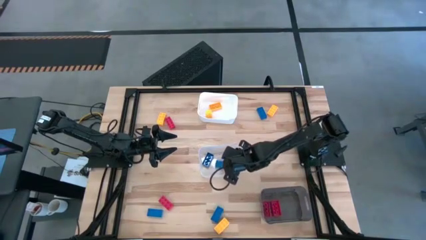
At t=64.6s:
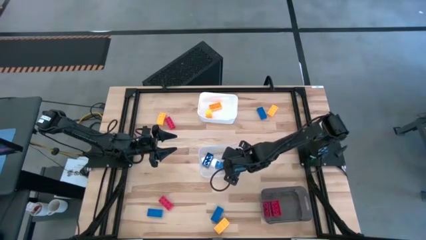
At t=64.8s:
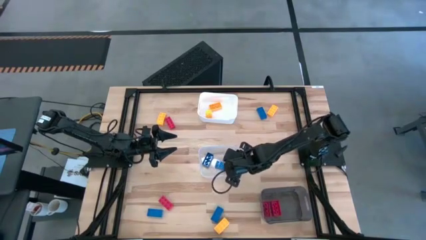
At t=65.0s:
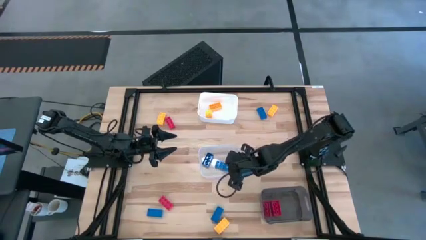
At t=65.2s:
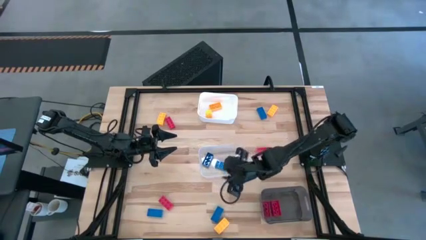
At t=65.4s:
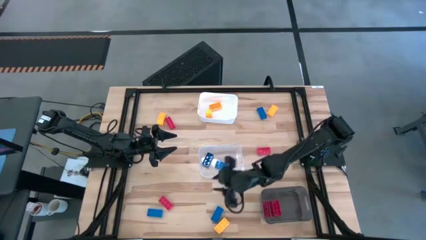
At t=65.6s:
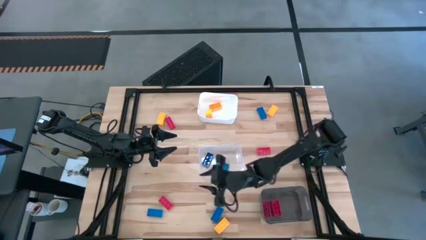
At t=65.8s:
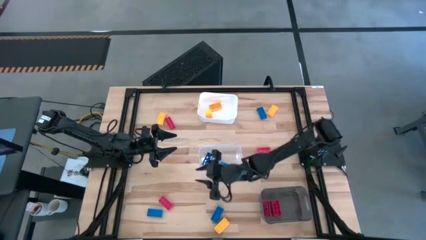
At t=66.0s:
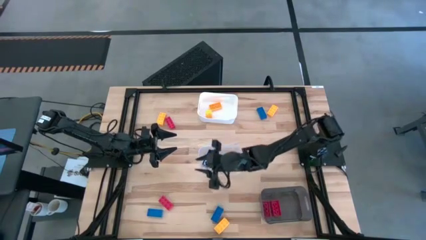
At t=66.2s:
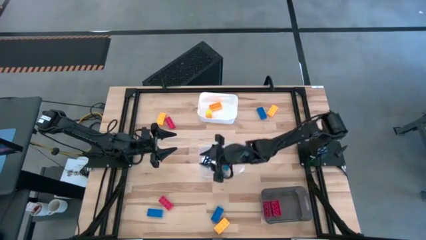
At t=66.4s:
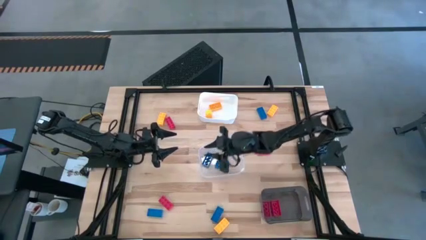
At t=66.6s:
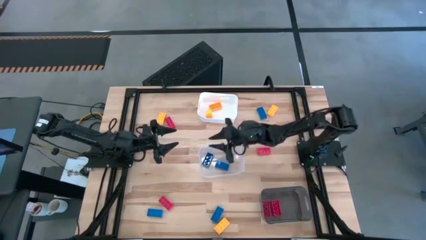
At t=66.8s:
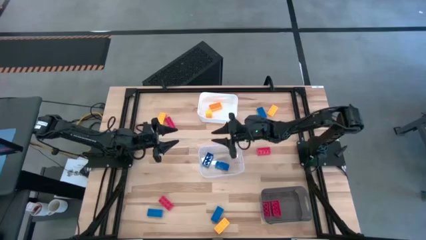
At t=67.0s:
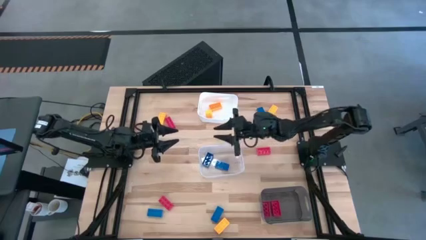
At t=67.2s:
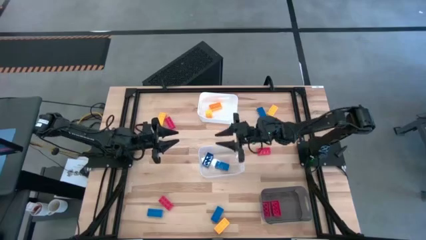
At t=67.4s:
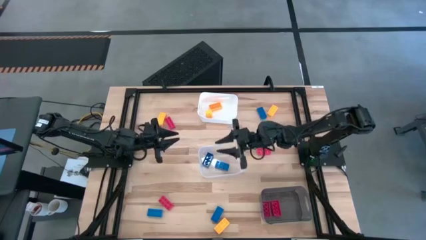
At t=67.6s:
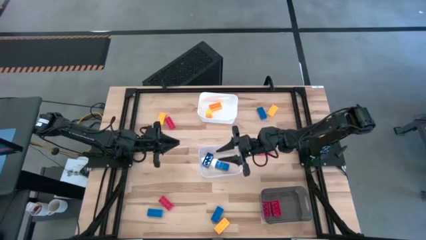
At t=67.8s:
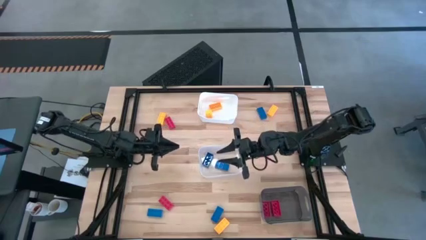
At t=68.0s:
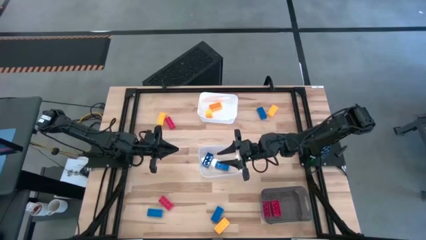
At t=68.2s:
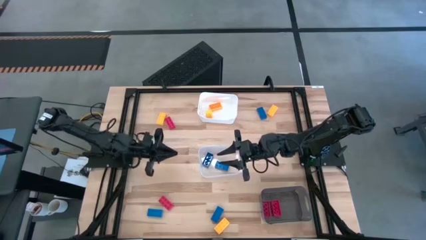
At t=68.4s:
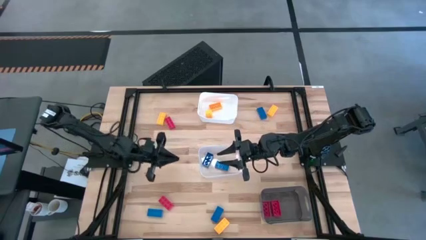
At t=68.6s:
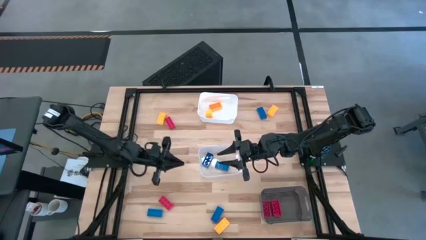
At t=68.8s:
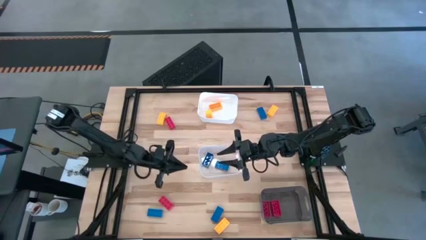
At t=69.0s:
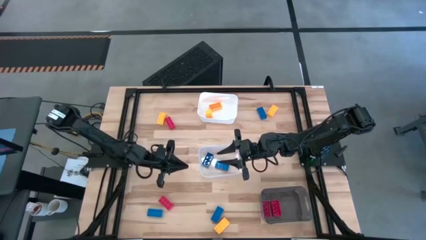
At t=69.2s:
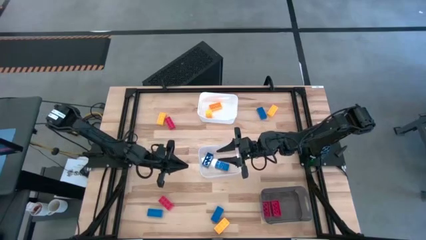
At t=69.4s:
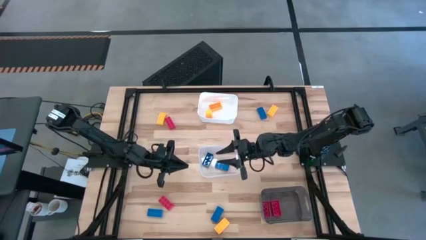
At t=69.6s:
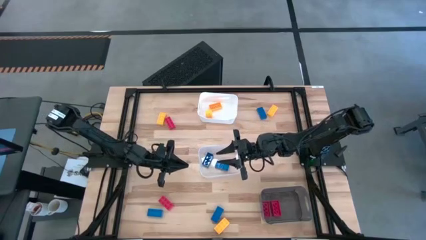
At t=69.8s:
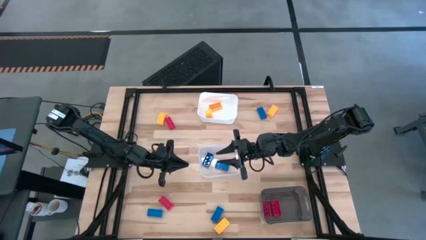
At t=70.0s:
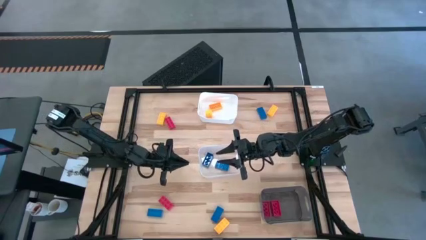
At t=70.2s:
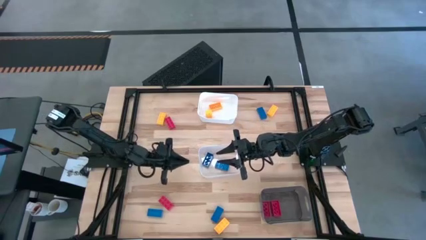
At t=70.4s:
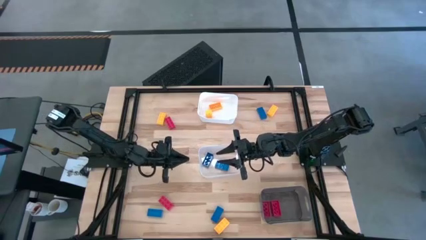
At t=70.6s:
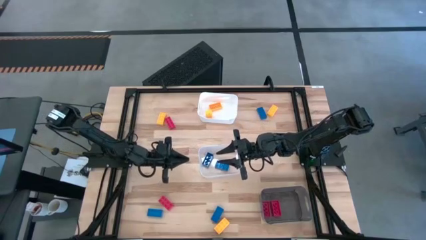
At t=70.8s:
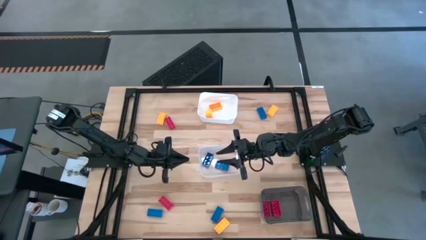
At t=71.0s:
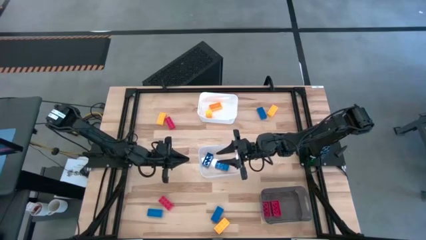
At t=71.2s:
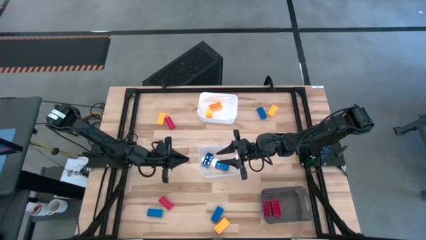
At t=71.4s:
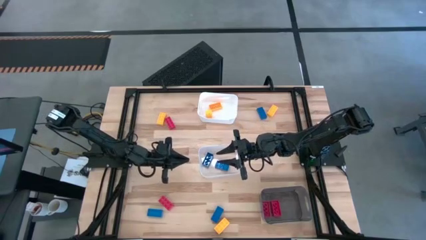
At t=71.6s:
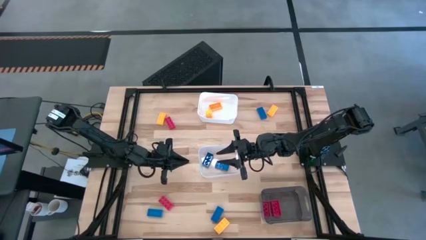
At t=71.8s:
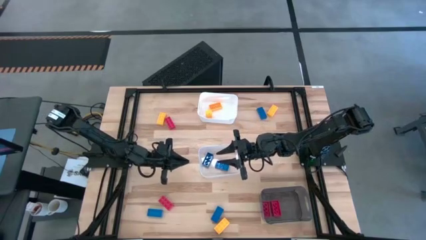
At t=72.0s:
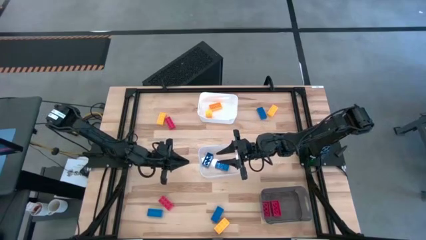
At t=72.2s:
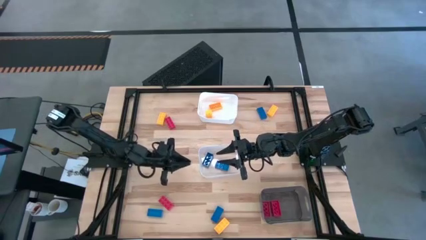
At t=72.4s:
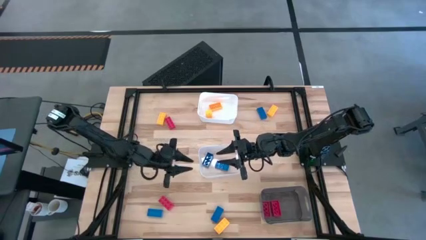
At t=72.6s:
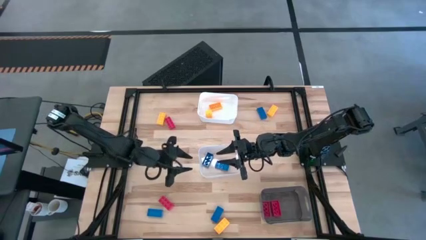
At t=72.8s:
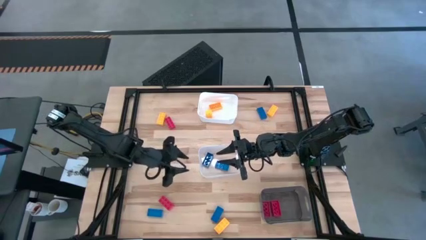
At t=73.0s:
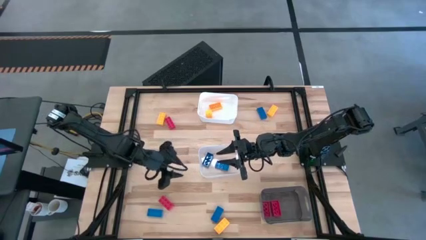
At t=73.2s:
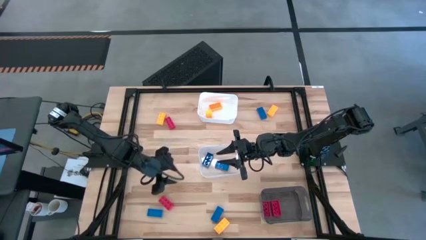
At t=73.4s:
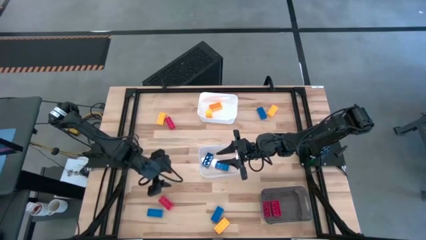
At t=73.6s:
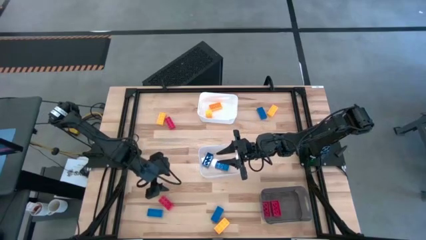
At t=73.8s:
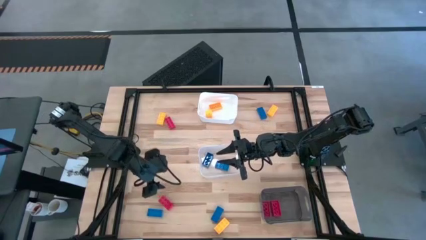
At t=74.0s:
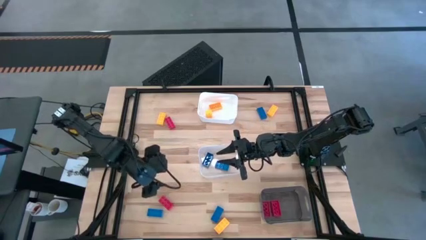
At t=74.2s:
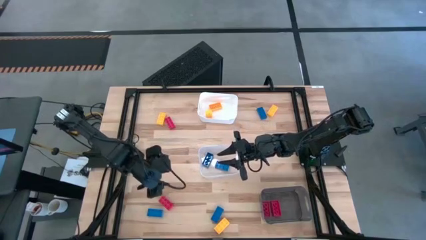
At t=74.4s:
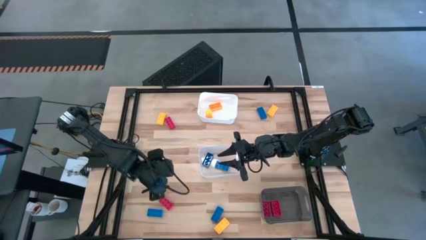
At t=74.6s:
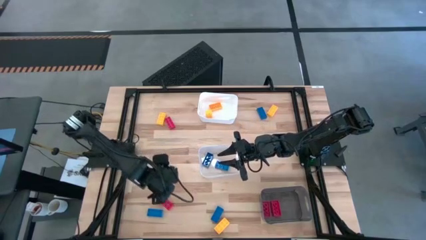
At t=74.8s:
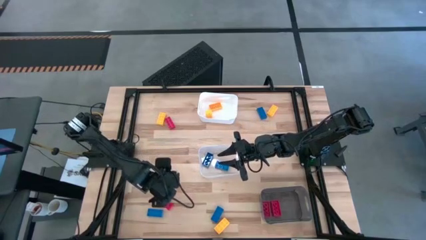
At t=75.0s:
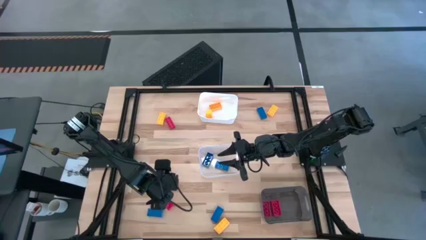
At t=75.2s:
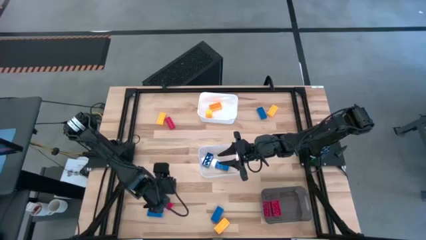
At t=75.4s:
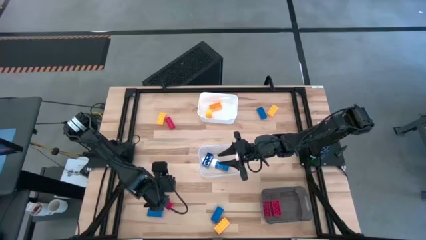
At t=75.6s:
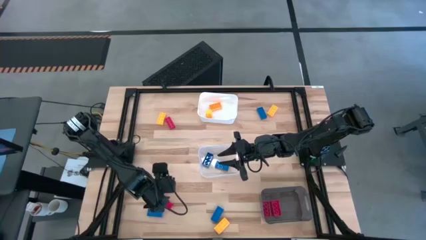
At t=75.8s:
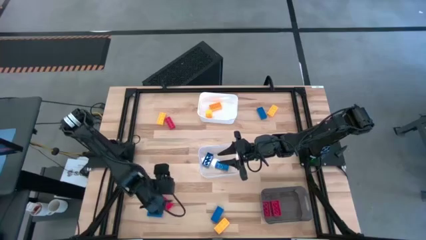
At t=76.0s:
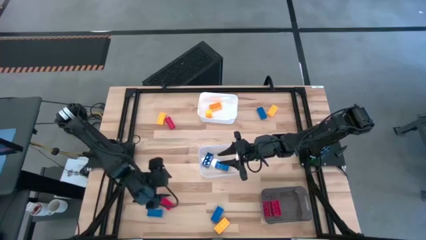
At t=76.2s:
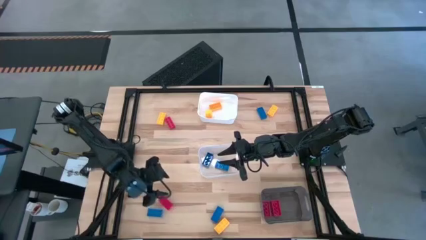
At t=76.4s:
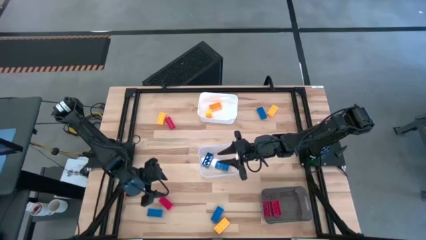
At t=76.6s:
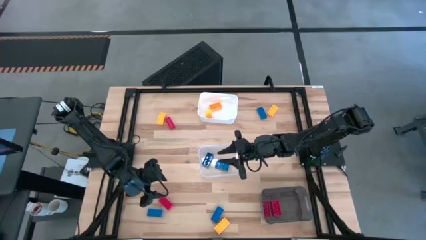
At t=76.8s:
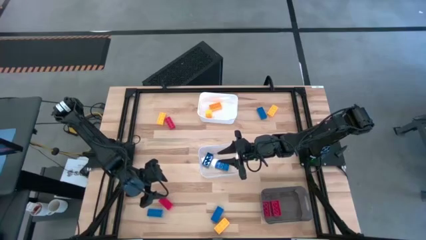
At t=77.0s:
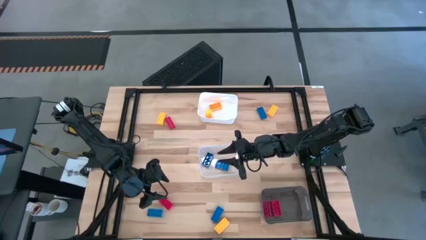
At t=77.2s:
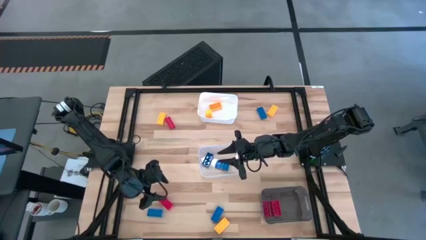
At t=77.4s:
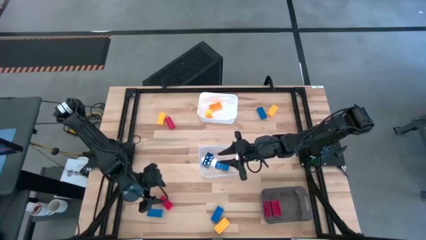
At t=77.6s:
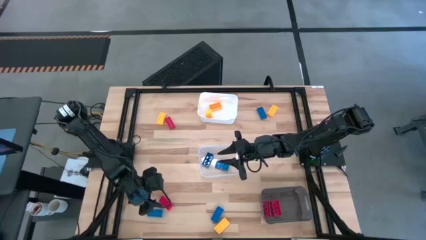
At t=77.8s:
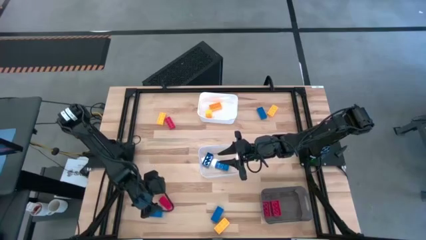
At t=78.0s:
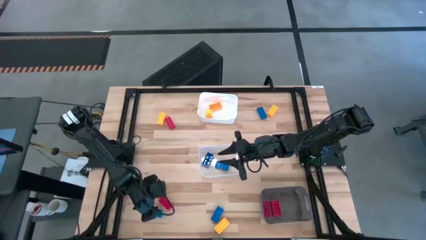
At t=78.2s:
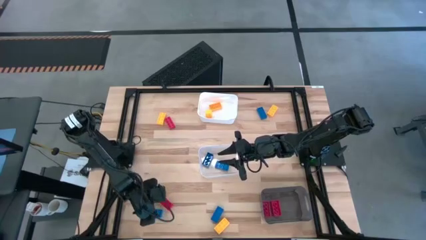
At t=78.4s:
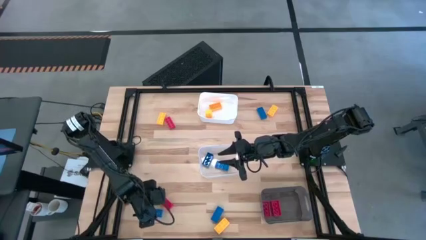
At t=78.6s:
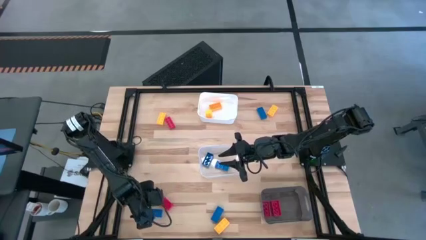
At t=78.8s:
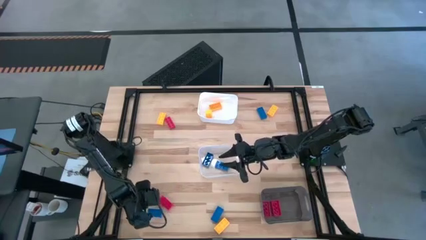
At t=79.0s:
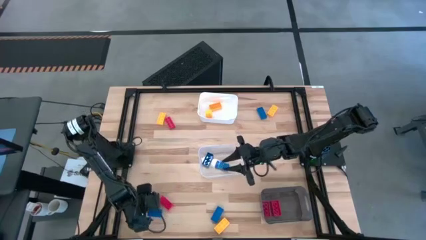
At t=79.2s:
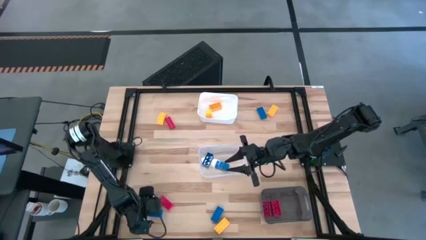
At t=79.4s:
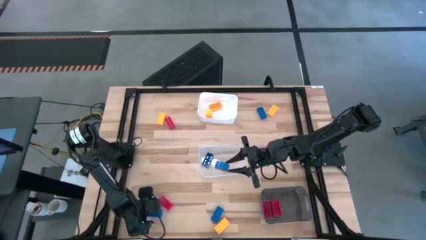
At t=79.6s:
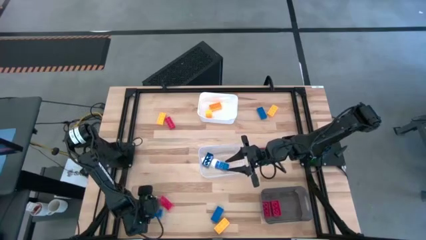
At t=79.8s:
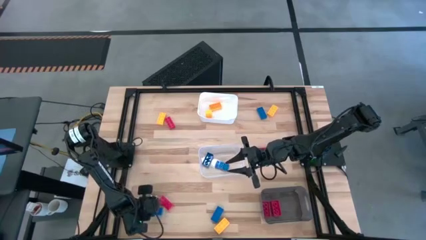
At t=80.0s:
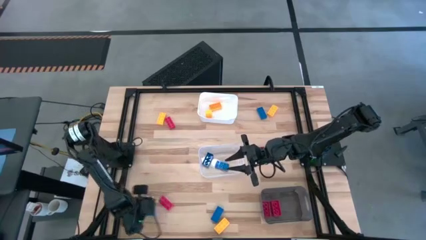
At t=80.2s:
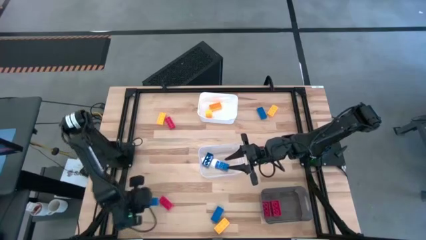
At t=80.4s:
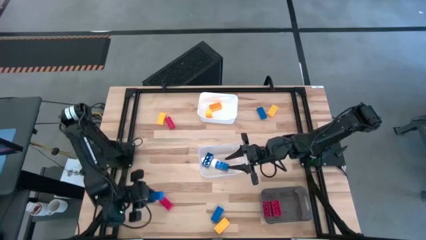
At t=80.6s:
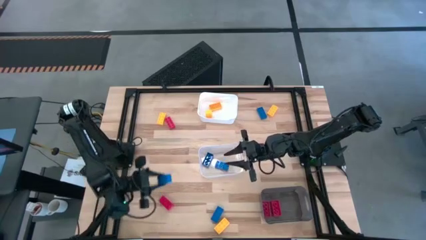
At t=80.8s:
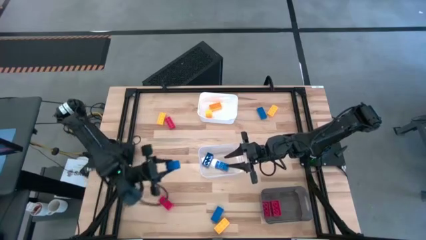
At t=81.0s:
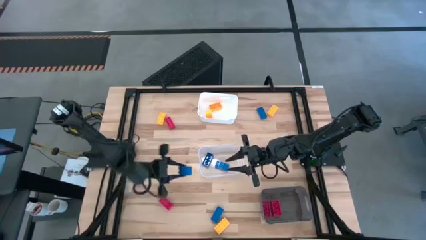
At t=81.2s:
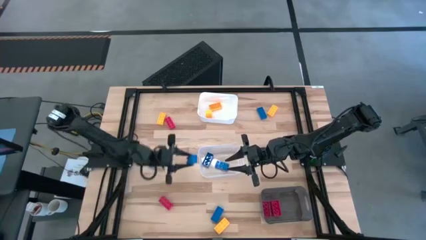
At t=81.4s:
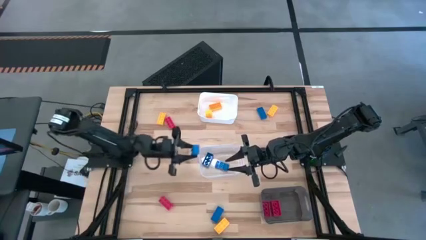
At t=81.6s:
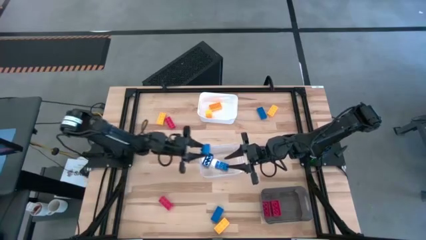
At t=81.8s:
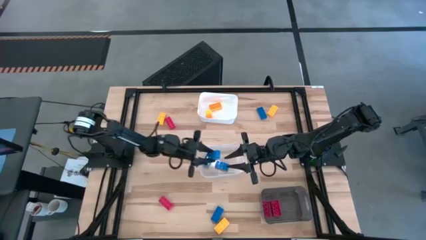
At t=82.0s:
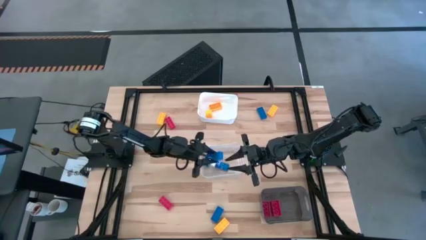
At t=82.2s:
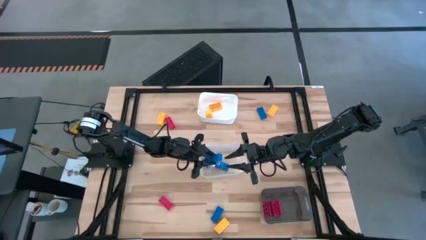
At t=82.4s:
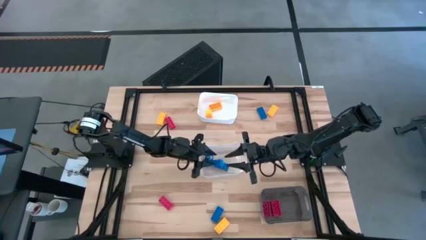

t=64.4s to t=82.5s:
Task: Sort & place blocks by color
Put the blue game piece into the transparent bin
